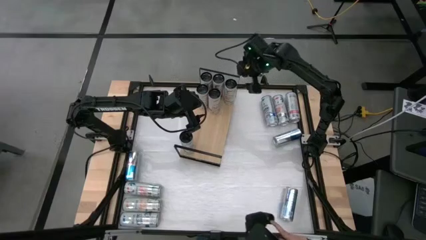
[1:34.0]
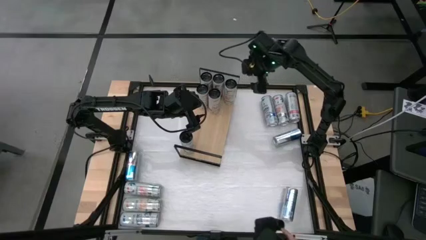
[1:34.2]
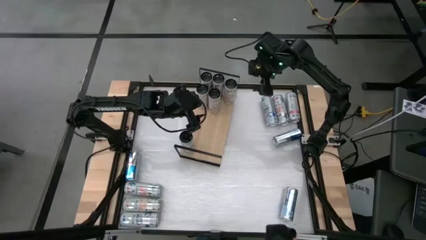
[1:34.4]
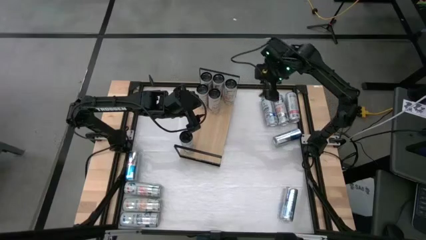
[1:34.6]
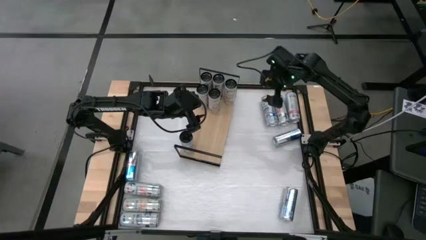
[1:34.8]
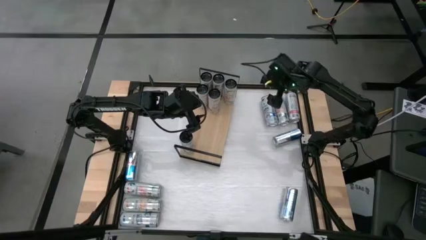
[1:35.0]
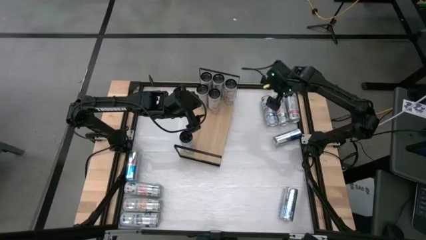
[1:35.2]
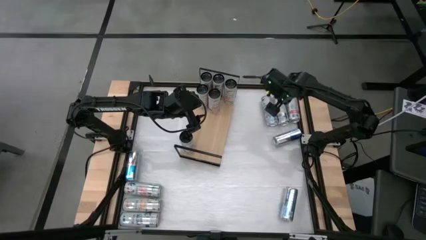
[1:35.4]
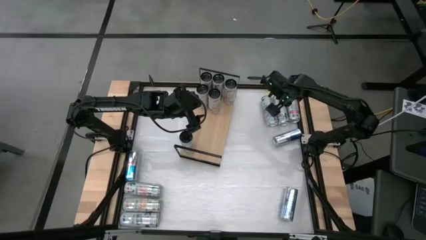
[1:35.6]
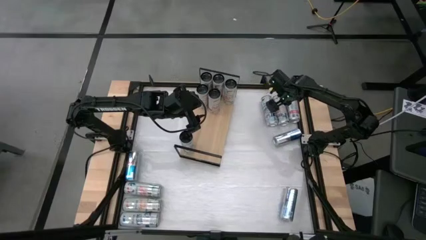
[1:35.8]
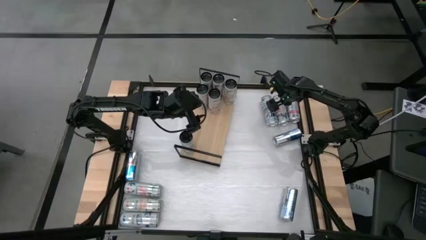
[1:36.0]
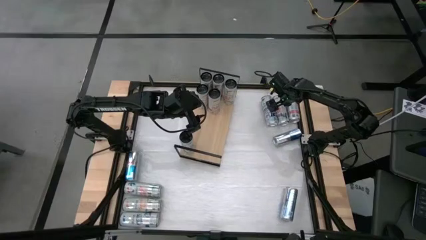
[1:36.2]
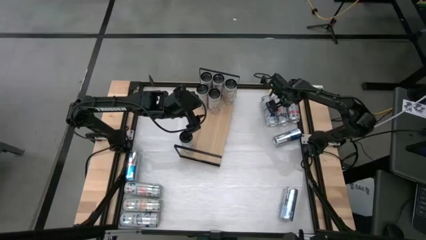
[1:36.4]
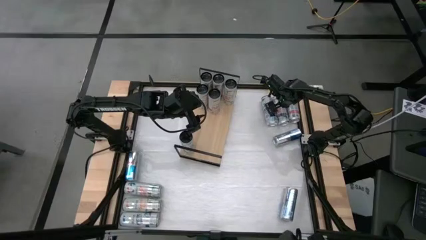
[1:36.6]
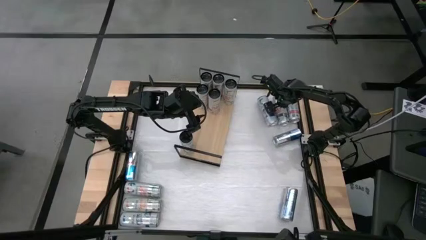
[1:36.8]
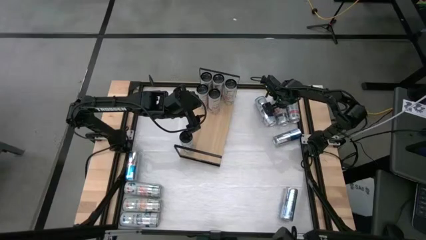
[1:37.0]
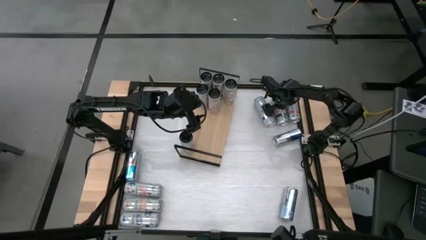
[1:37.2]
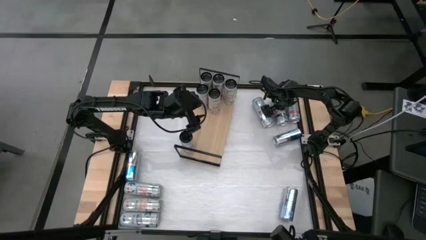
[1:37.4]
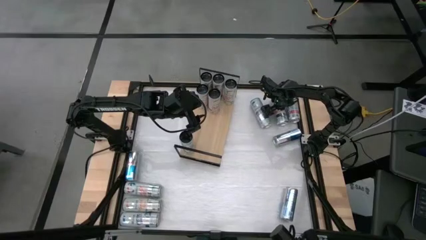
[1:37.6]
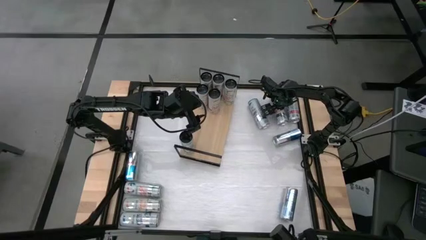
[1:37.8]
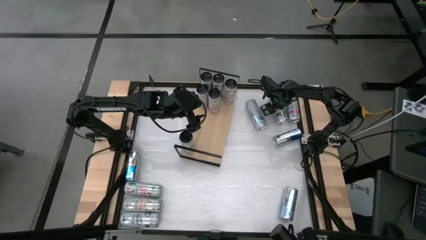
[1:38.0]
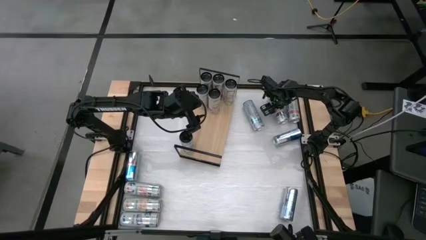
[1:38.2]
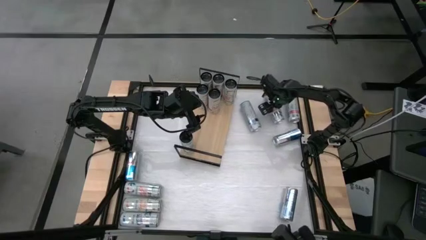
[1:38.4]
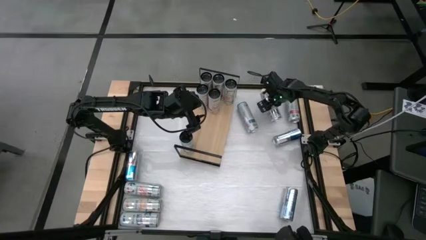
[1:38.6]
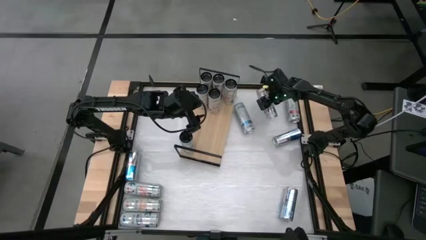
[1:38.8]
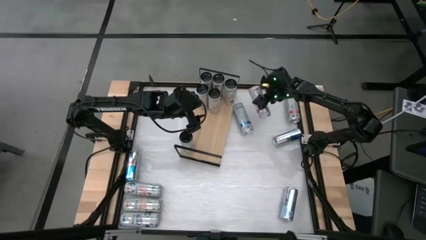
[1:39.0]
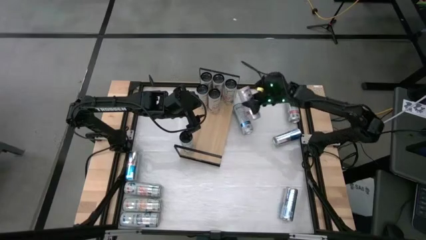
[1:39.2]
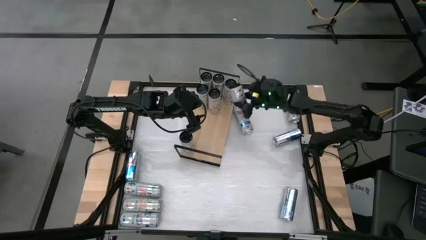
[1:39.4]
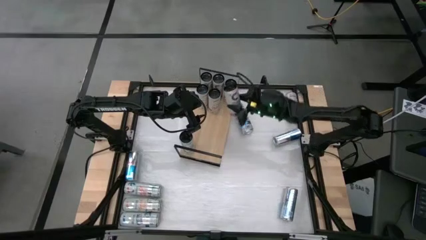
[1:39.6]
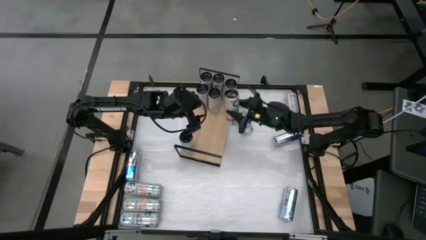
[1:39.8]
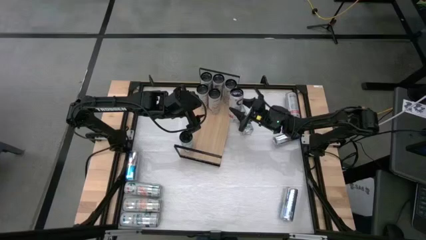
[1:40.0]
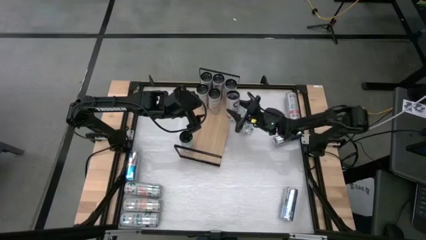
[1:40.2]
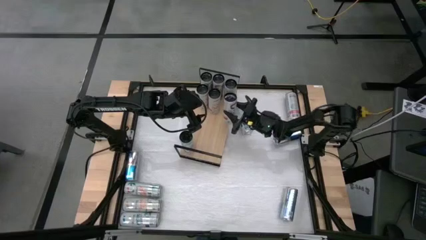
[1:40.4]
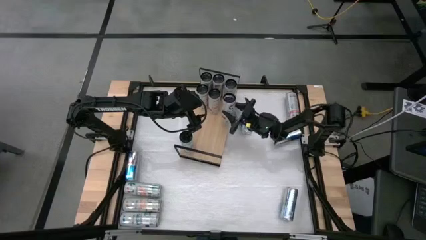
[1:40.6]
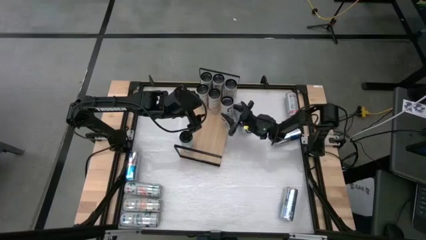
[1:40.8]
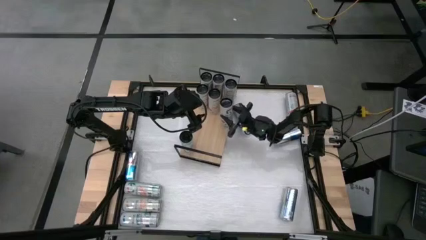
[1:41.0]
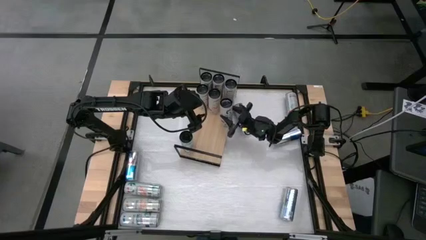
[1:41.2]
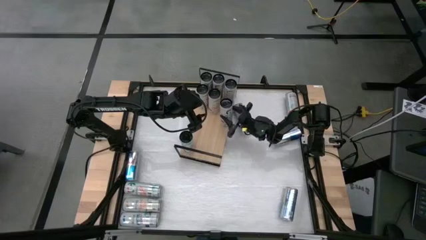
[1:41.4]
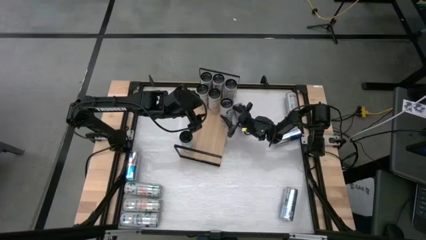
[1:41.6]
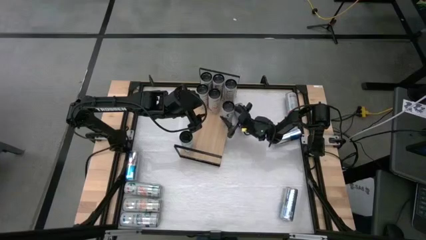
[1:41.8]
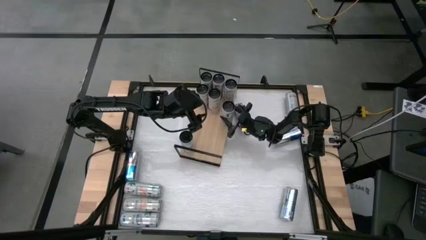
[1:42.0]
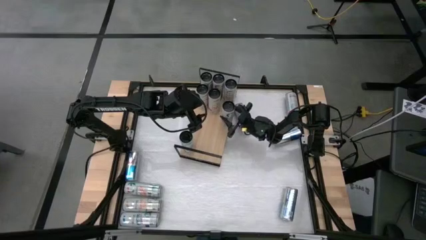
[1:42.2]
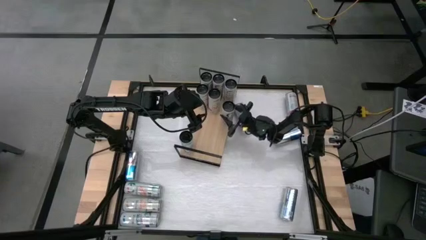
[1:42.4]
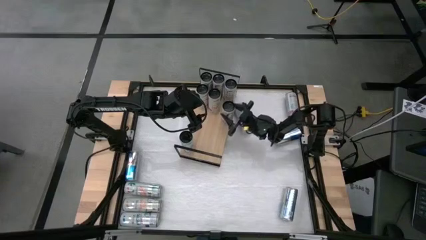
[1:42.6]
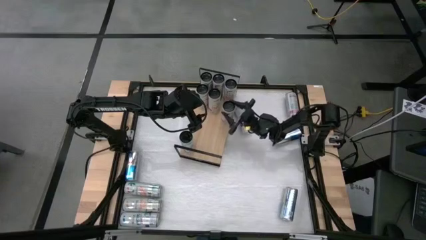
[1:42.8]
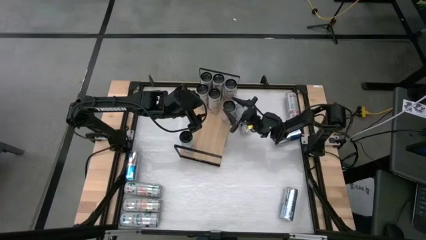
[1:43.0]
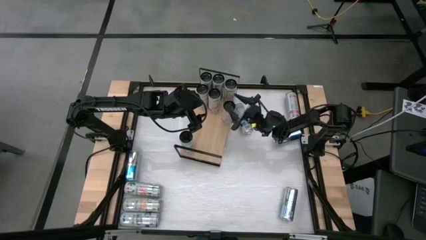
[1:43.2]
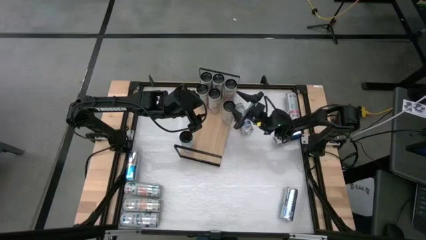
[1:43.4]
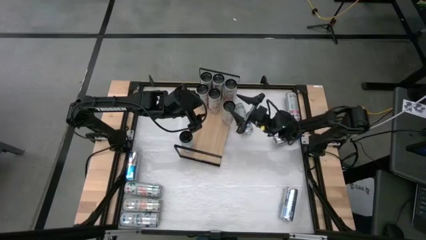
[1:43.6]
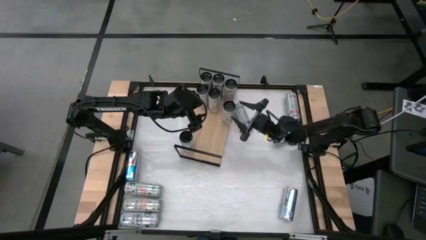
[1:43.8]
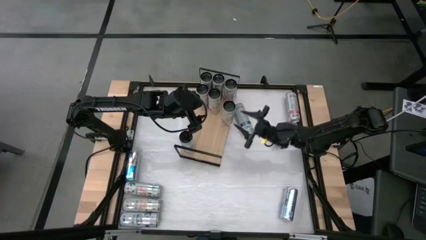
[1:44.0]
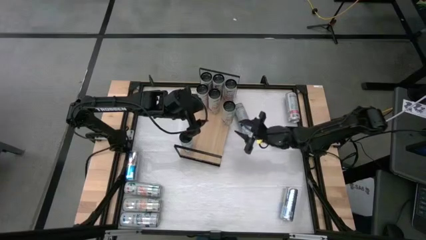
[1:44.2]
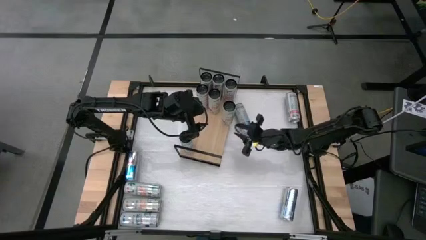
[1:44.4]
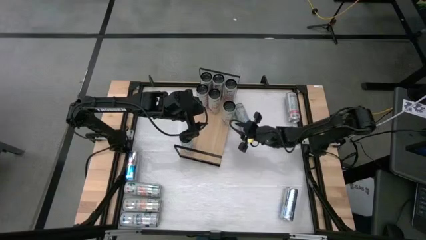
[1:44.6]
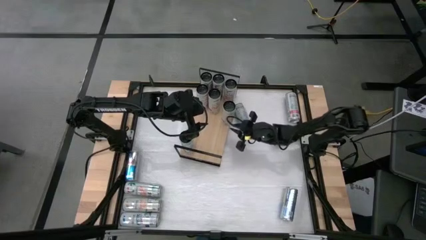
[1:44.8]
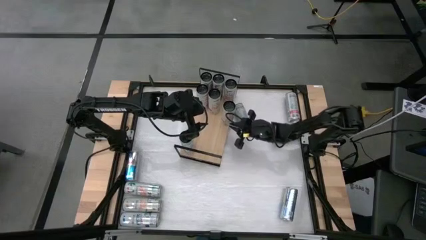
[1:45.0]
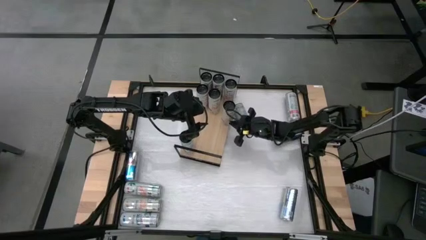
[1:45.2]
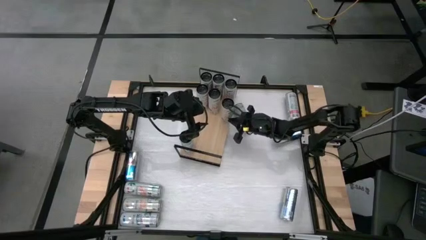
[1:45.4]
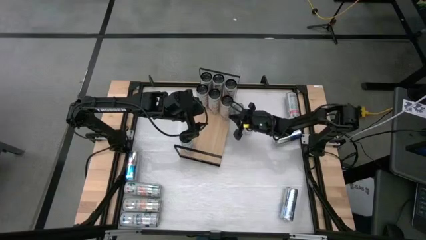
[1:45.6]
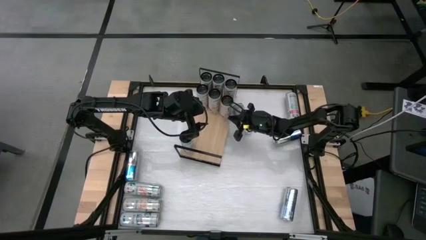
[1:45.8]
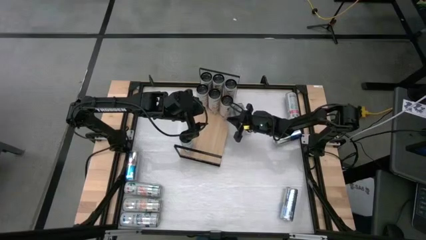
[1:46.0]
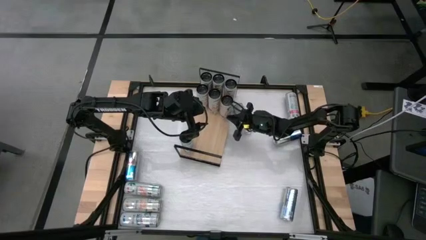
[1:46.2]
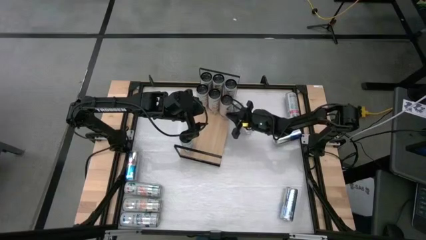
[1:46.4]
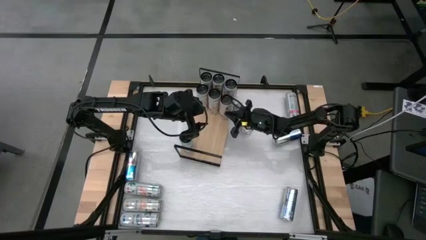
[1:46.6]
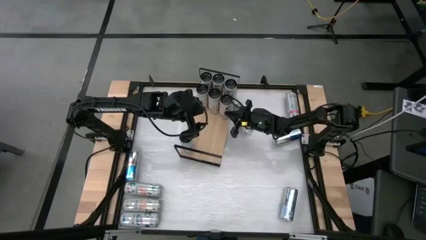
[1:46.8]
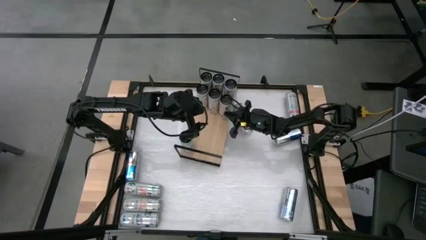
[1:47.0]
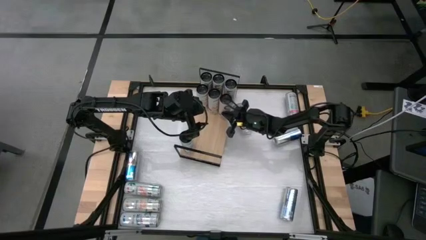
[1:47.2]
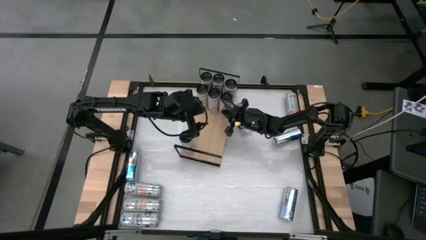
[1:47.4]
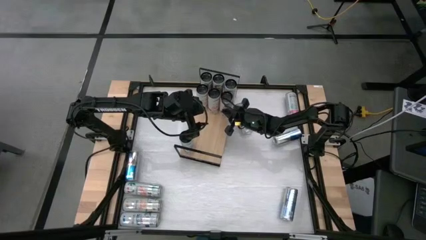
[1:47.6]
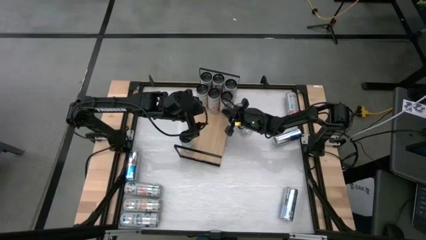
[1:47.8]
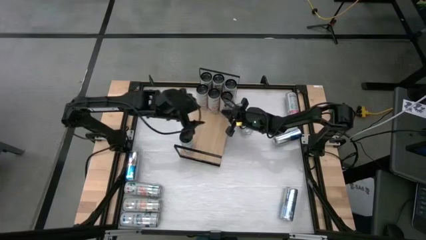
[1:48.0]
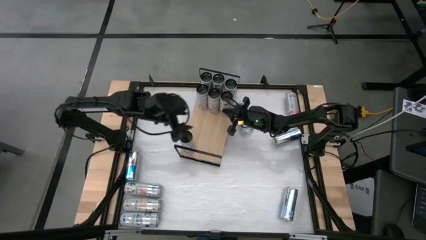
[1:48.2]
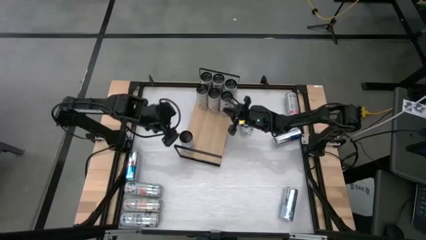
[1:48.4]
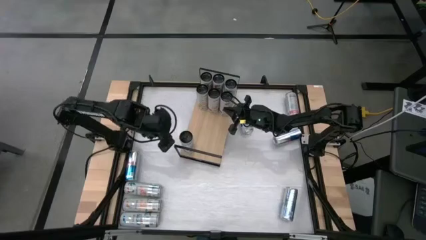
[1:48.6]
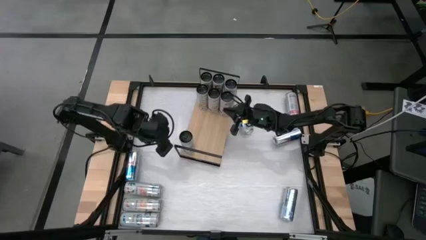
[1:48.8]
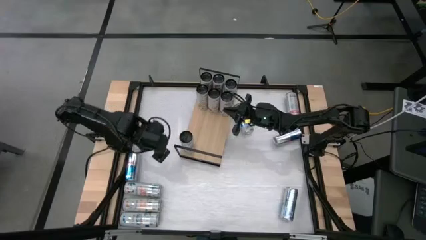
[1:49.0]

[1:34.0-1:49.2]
Task: Place canned beverage on shelf
Put the top left pink soda can on the shelf aligned with the other pink soda can
